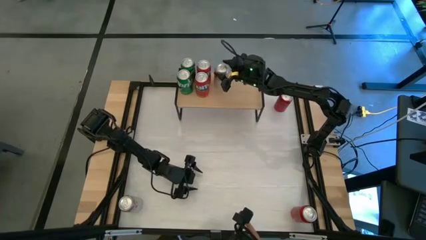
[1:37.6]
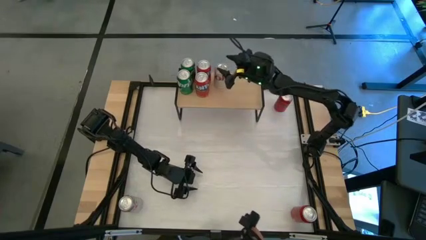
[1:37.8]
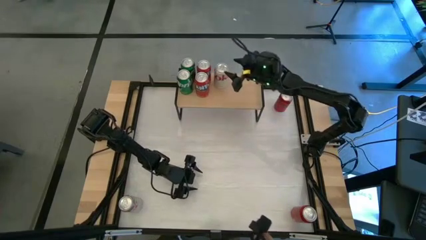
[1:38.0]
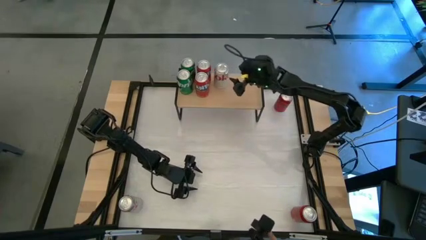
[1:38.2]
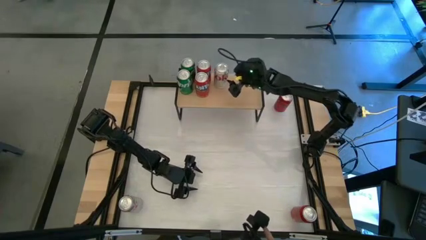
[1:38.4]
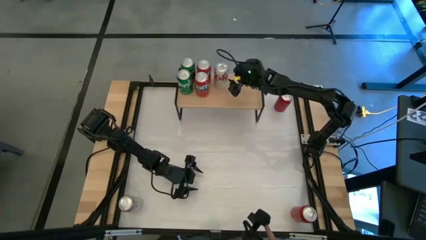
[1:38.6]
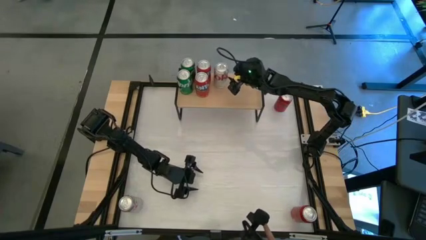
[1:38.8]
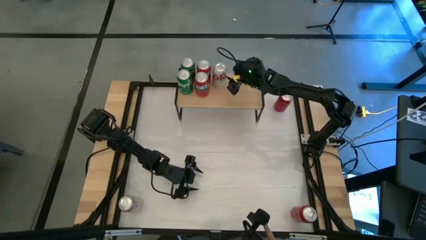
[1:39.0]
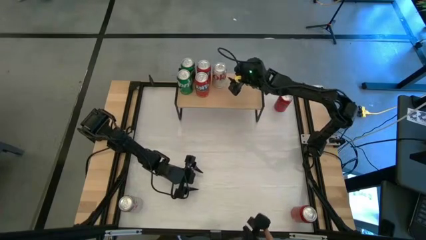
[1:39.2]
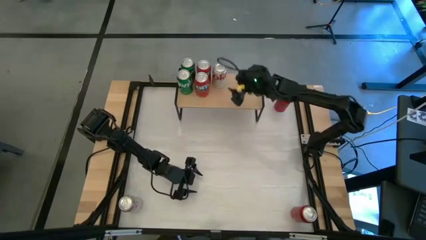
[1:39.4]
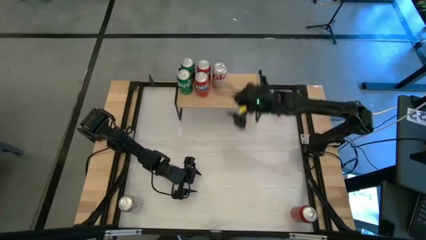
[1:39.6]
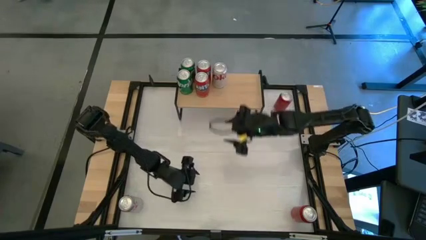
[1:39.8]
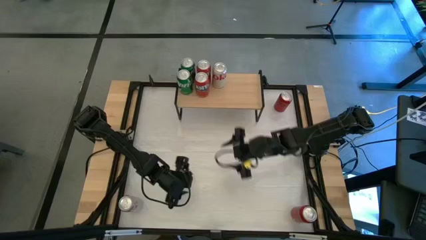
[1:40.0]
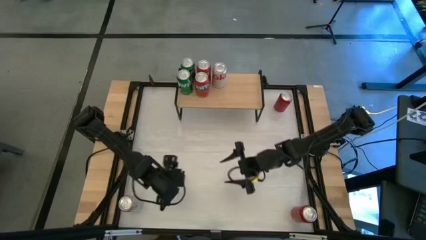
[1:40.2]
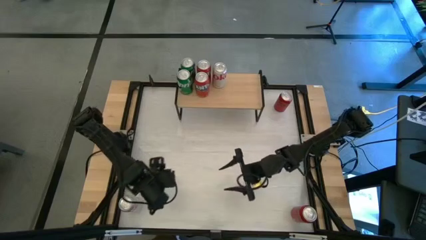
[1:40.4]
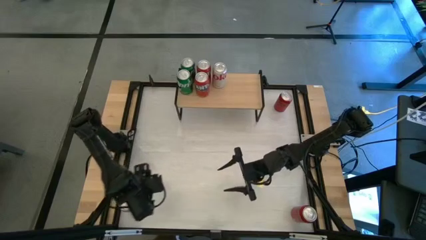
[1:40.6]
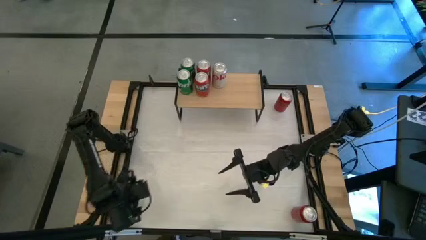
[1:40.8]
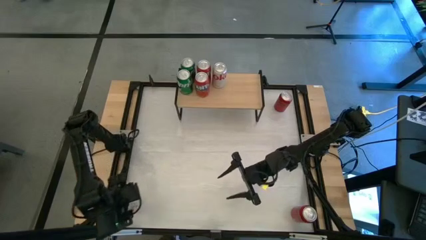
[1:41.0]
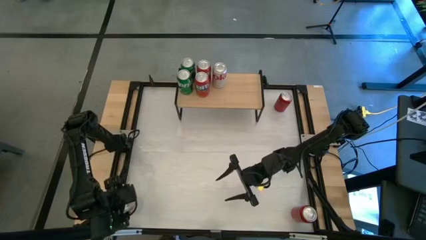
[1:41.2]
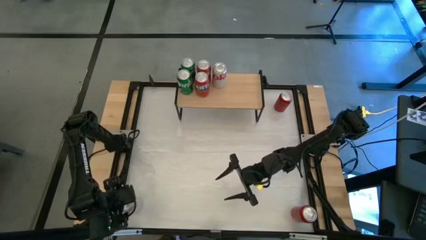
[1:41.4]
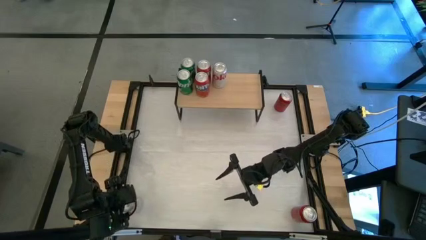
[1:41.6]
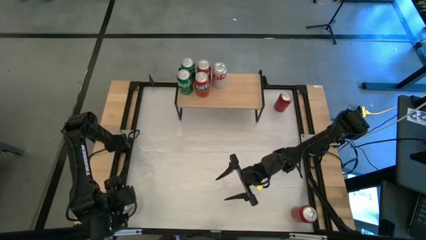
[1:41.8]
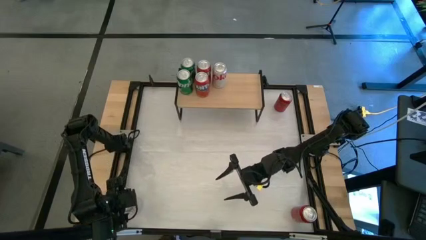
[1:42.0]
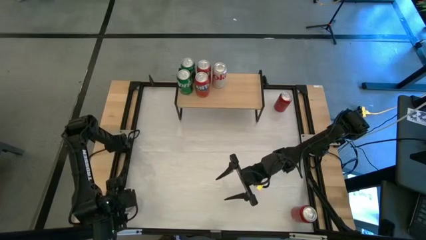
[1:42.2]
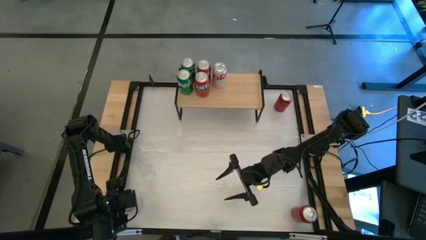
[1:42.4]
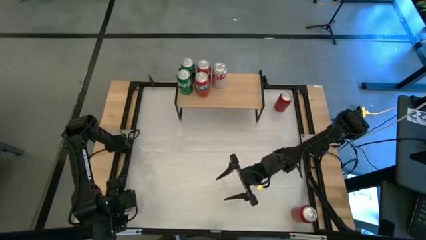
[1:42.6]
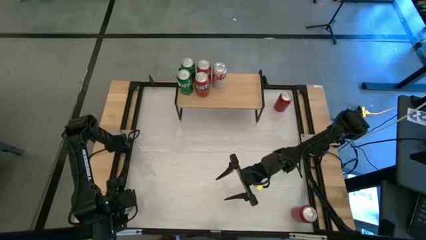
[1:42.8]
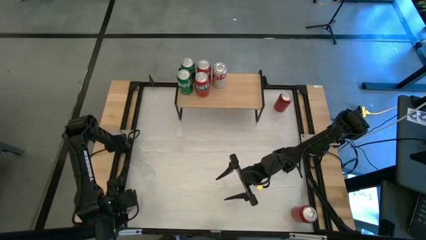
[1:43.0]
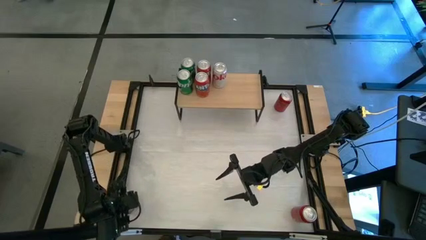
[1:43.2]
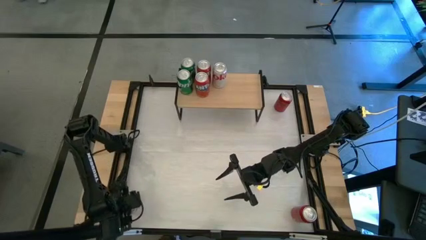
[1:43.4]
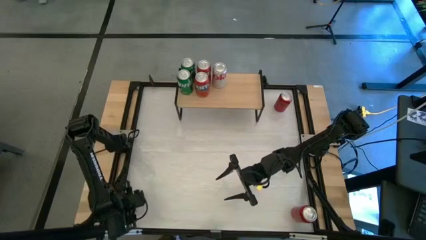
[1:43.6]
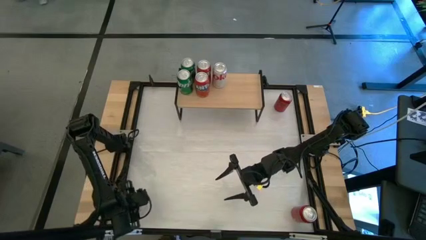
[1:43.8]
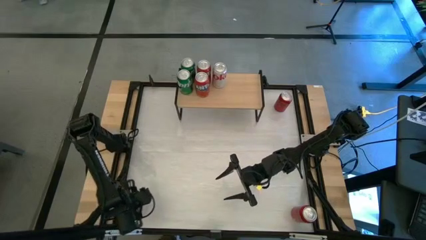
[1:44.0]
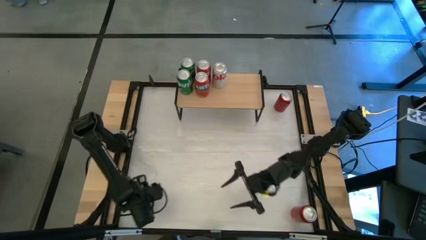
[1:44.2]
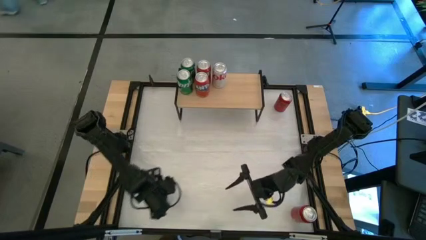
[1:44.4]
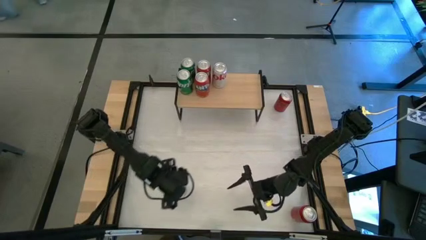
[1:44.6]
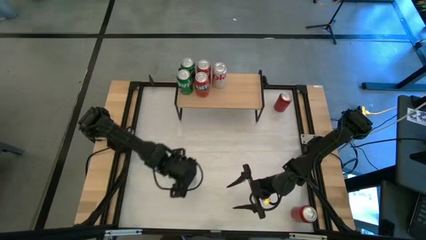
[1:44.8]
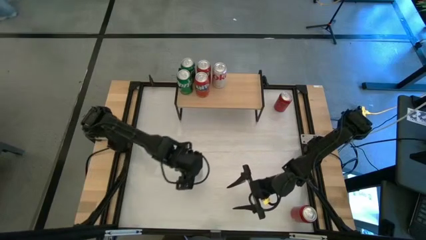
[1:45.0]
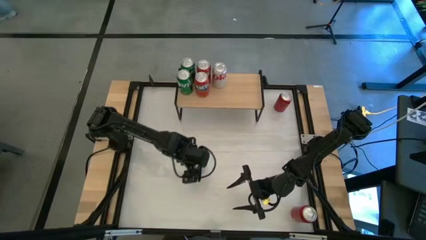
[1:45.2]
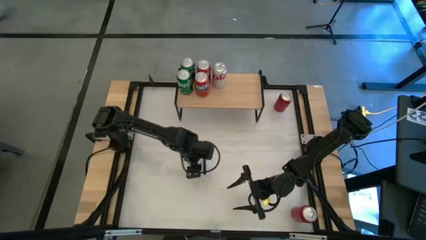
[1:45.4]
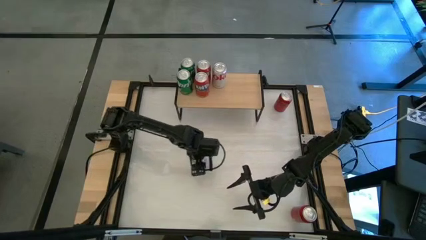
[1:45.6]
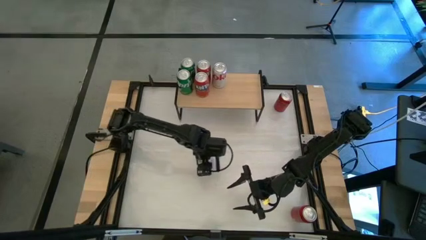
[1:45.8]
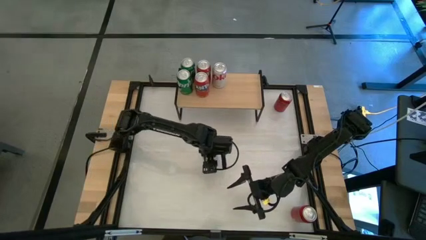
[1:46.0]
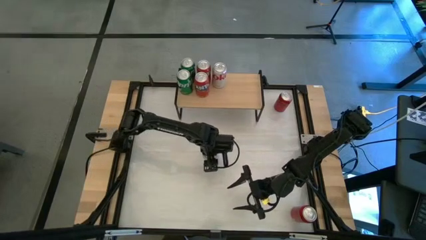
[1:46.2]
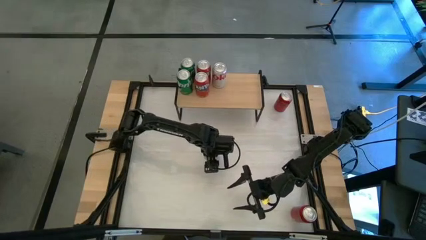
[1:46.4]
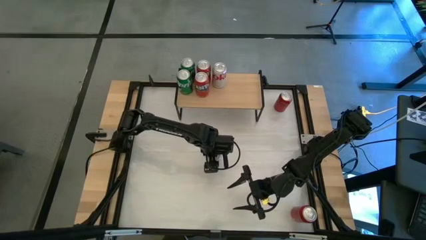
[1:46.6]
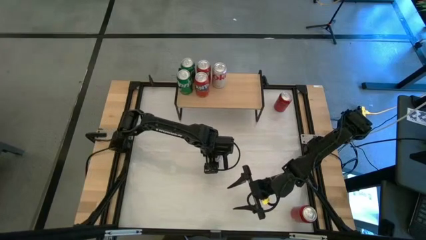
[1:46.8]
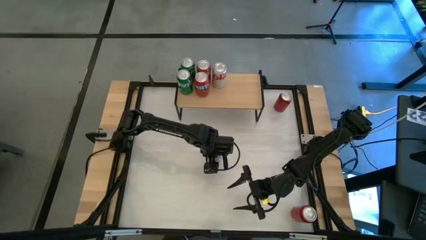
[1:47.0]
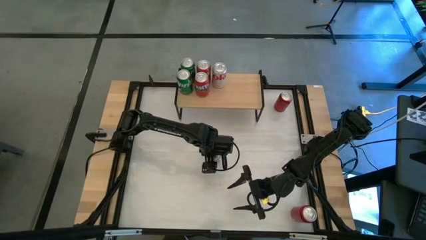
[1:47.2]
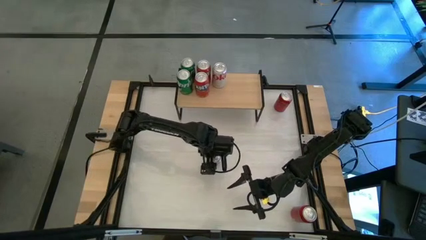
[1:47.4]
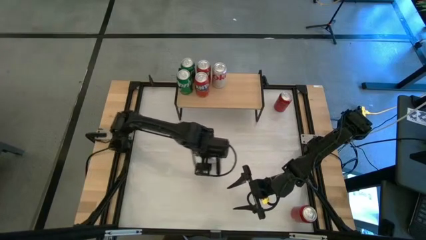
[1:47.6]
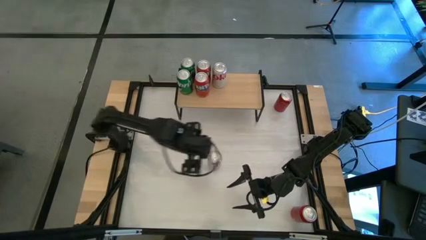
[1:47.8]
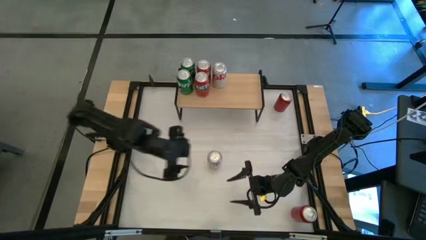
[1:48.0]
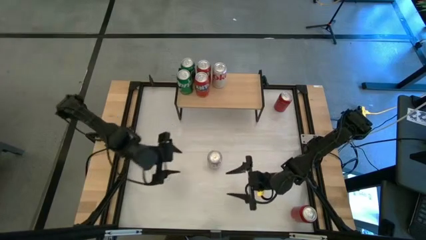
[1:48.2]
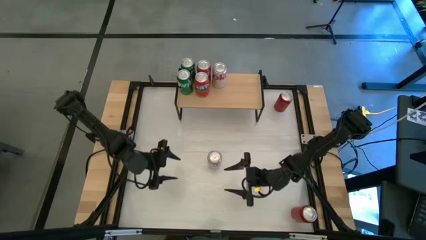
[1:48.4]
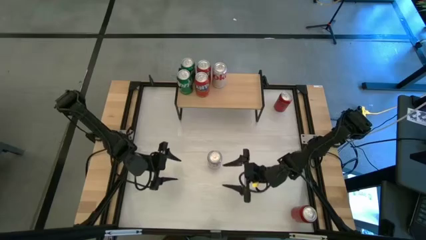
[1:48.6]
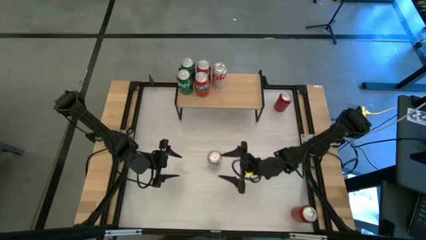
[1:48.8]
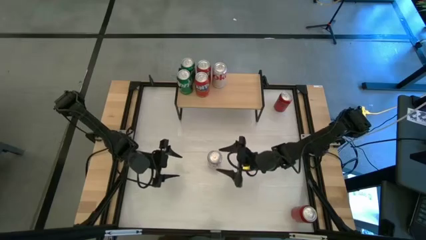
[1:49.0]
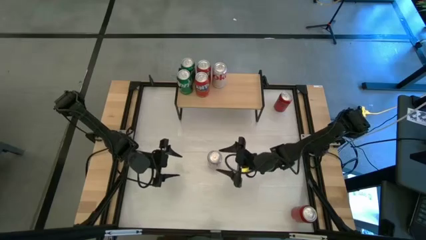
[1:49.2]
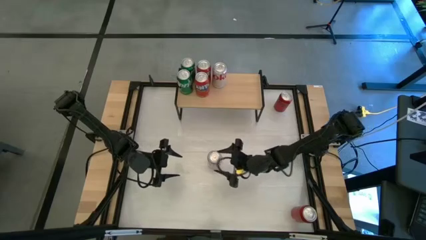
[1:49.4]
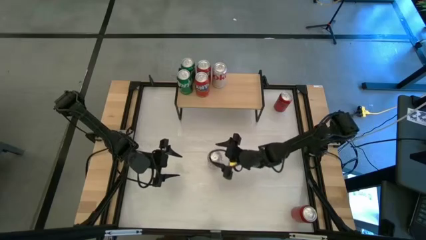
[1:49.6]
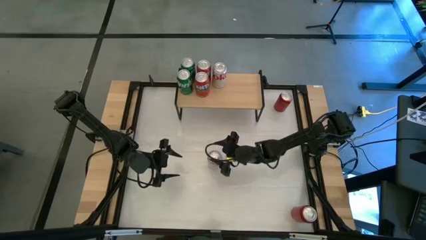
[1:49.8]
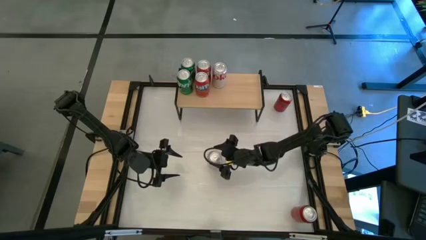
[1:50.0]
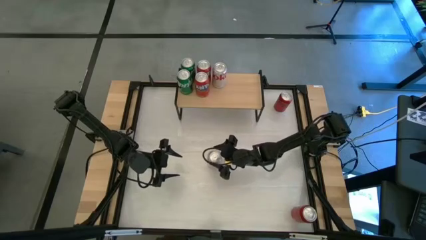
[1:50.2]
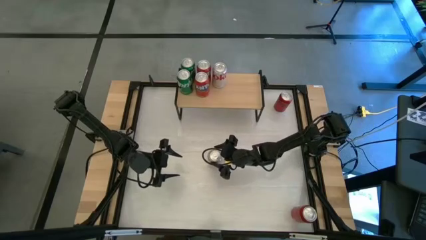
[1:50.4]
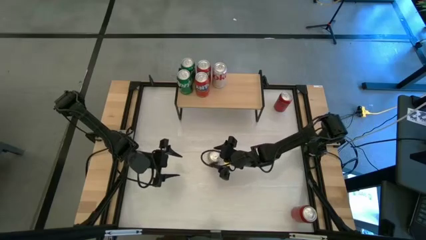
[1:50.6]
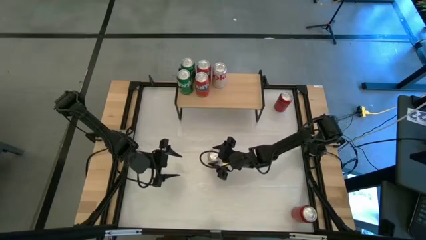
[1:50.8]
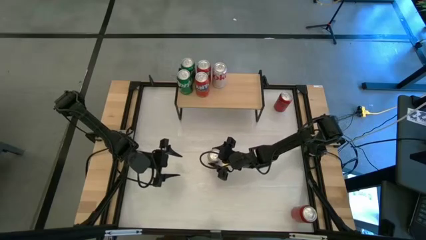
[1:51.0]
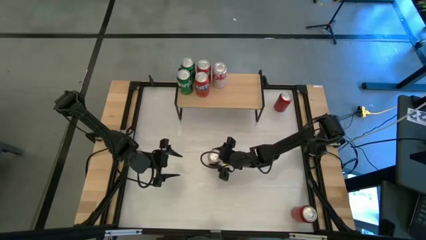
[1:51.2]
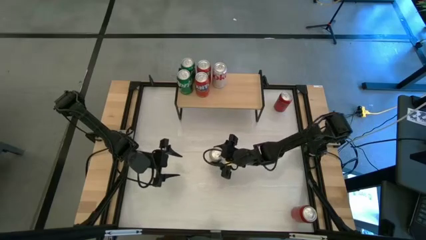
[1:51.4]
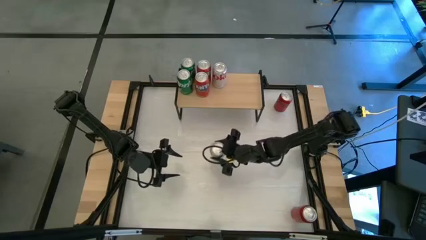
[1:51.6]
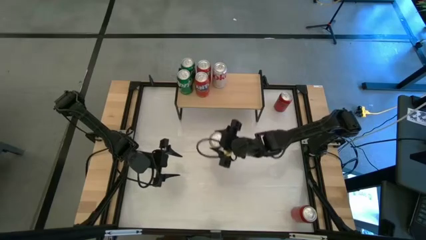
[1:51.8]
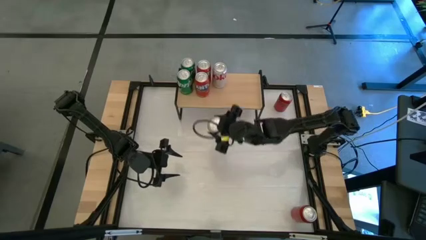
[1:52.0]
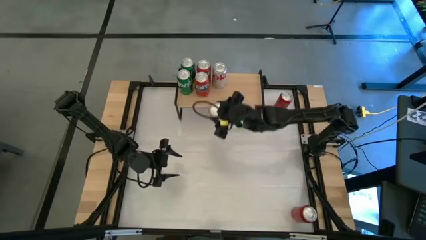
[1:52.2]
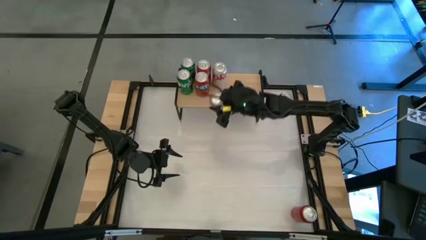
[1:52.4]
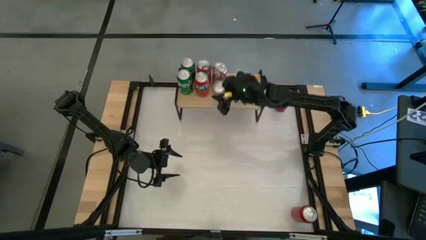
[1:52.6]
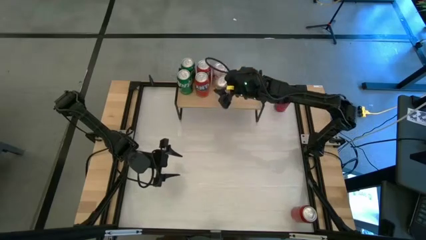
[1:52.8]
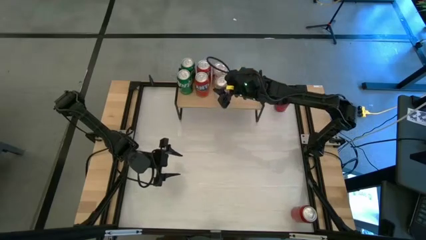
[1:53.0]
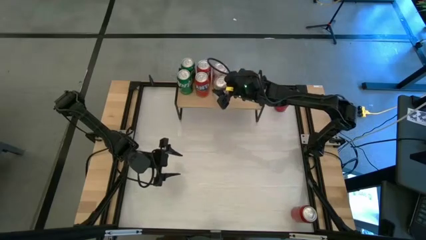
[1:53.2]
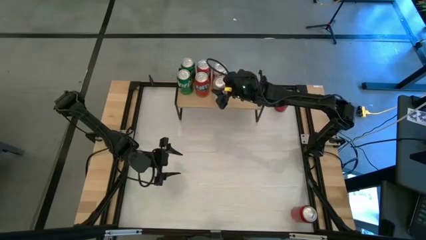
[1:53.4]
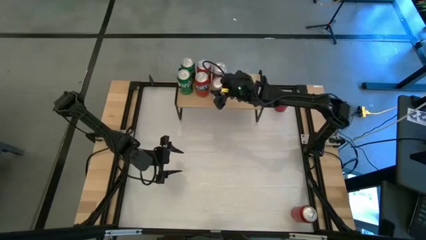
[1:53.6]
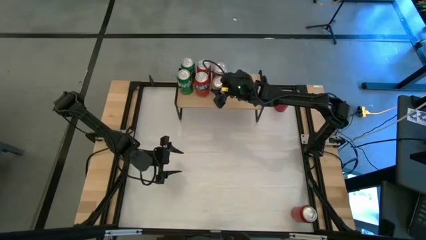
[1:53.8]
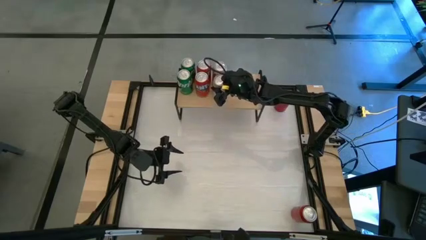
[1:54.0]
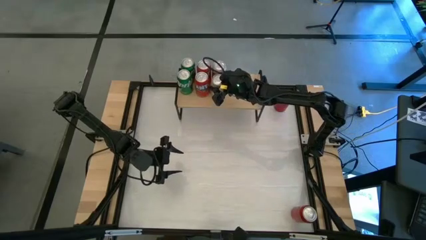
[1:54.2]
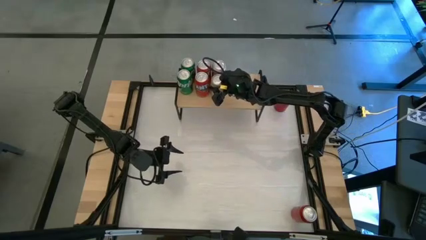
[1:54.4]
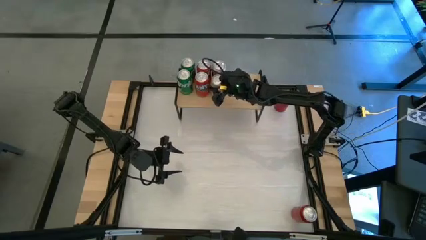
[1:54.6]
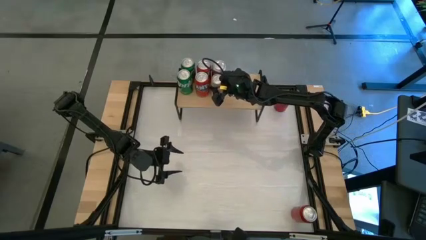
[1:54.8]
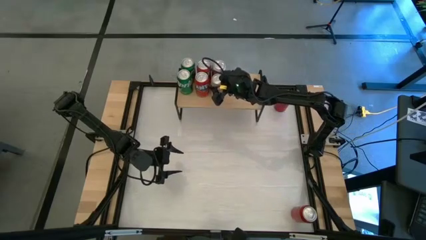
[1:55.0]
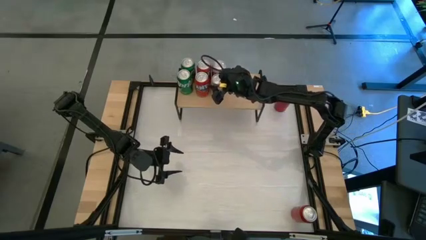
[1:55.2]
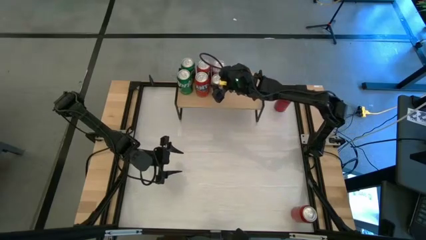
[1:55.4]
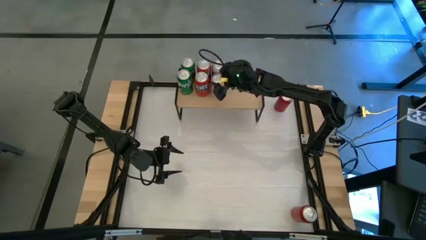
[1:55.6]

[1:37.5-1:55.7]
Task: Place canned beverage on shelf
Put the white soda can on the shelf aligned with the other white soda can
